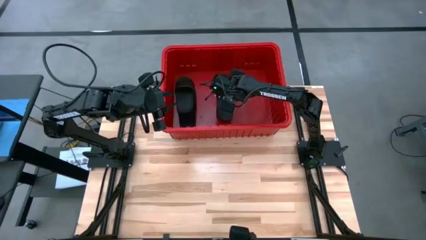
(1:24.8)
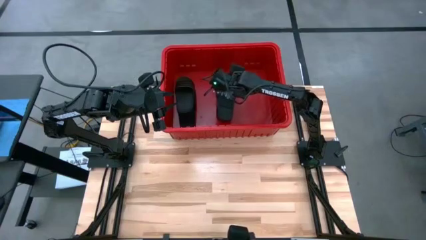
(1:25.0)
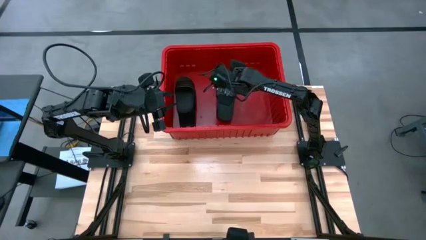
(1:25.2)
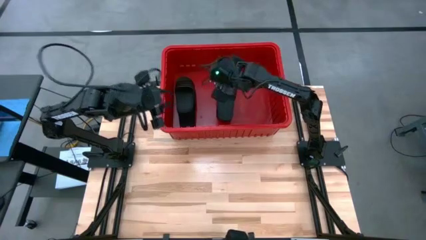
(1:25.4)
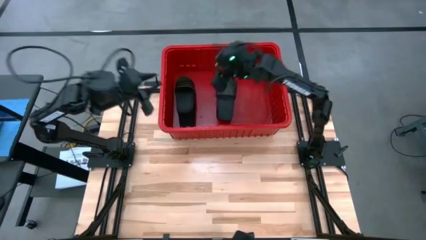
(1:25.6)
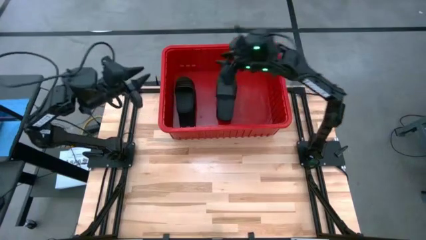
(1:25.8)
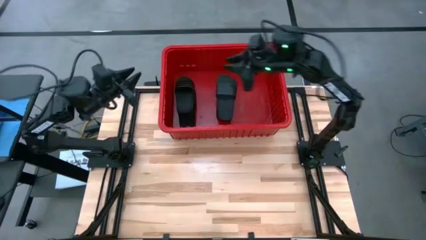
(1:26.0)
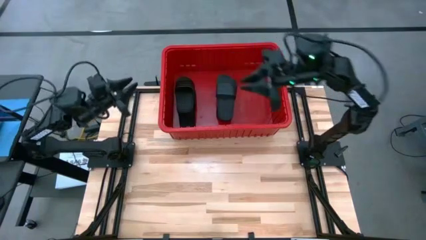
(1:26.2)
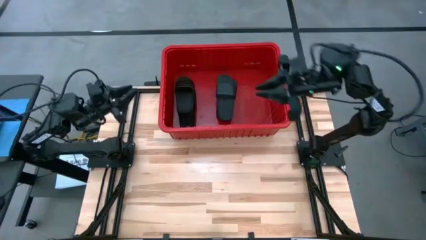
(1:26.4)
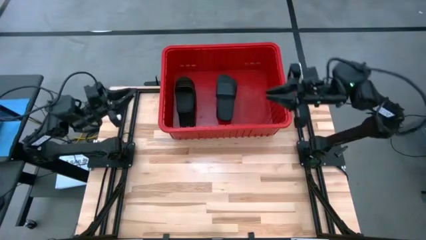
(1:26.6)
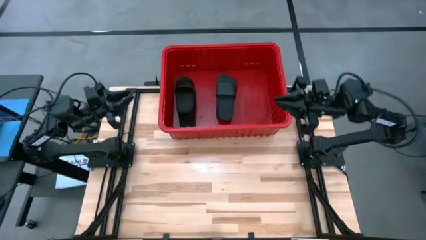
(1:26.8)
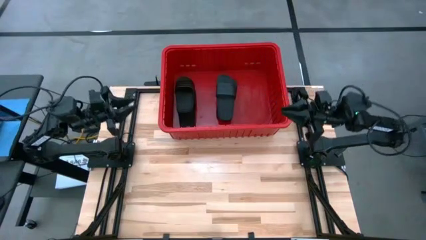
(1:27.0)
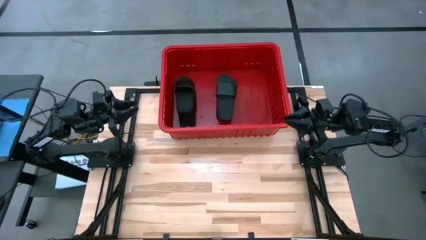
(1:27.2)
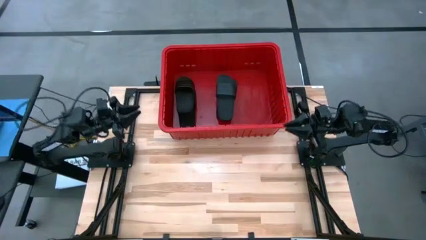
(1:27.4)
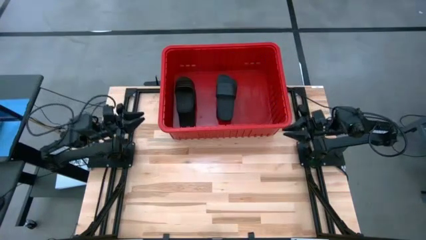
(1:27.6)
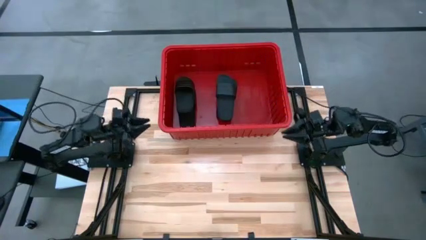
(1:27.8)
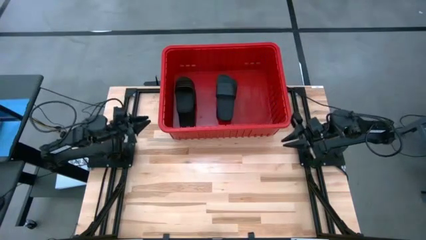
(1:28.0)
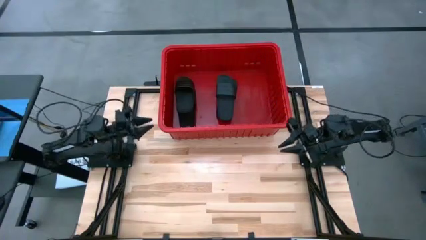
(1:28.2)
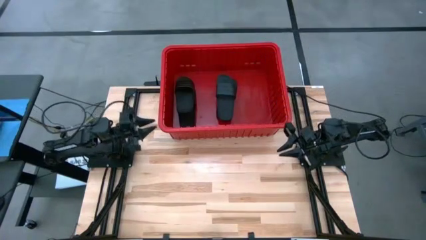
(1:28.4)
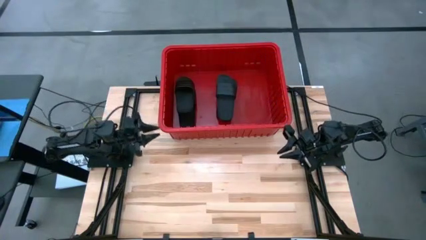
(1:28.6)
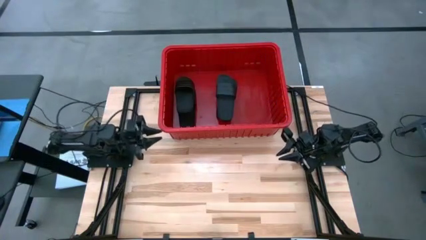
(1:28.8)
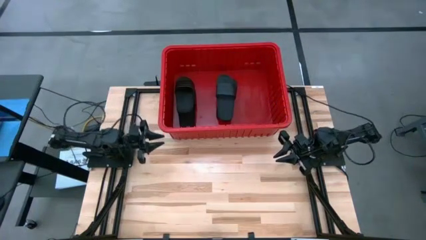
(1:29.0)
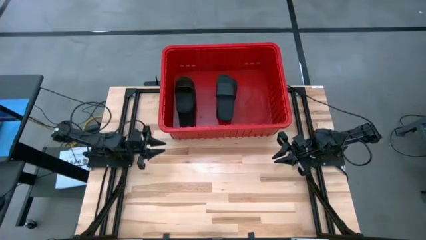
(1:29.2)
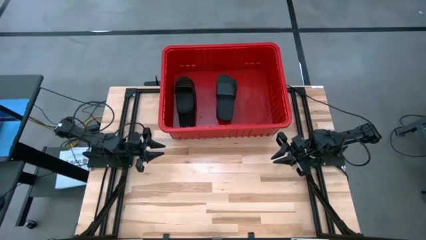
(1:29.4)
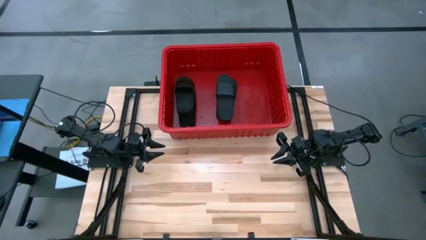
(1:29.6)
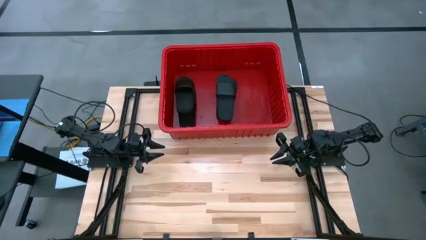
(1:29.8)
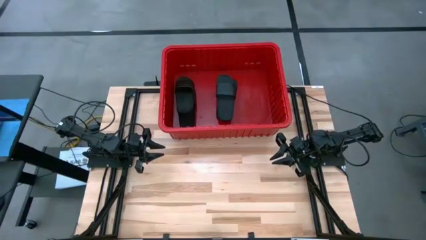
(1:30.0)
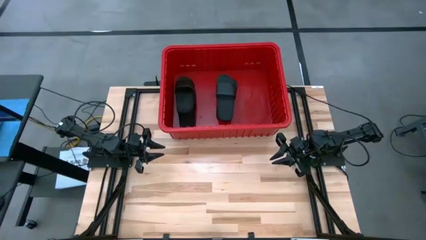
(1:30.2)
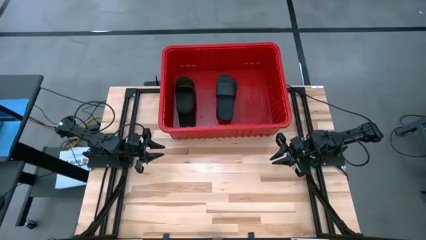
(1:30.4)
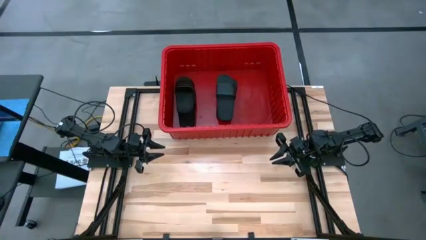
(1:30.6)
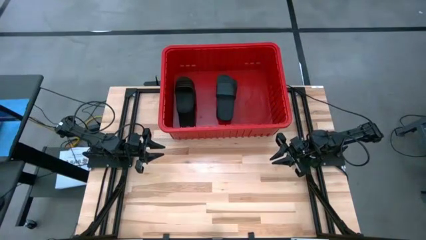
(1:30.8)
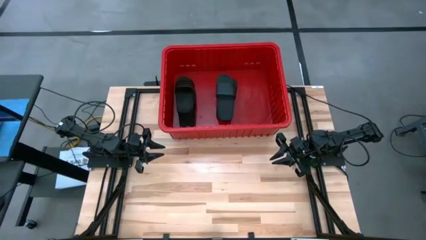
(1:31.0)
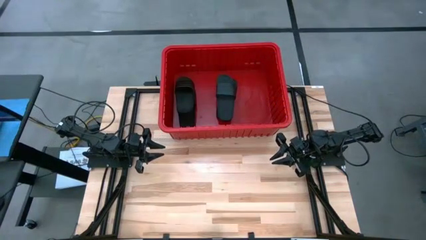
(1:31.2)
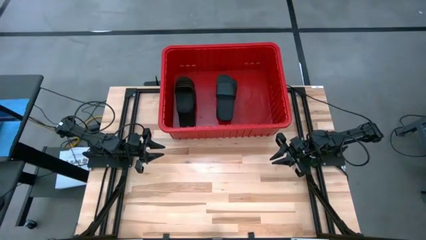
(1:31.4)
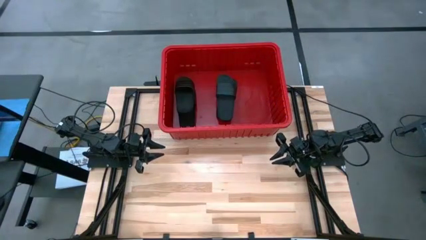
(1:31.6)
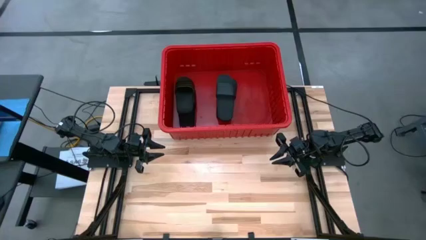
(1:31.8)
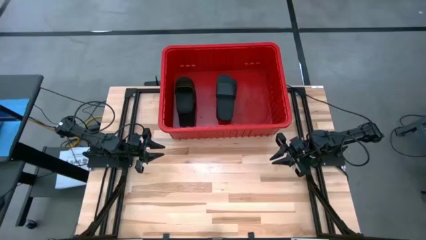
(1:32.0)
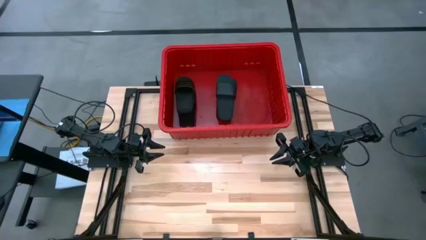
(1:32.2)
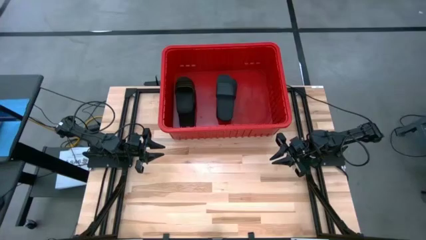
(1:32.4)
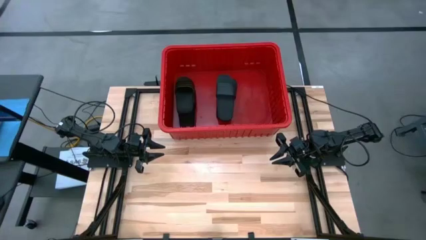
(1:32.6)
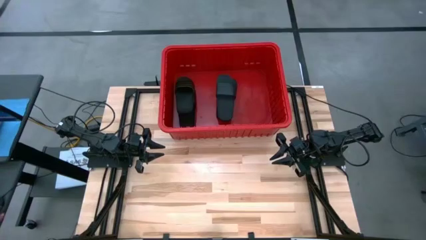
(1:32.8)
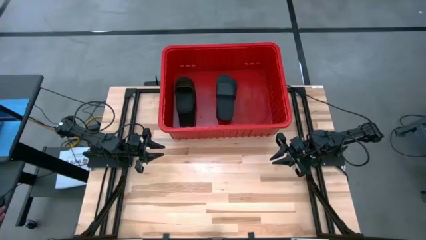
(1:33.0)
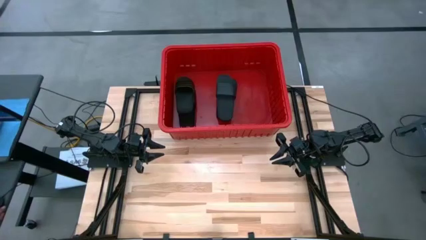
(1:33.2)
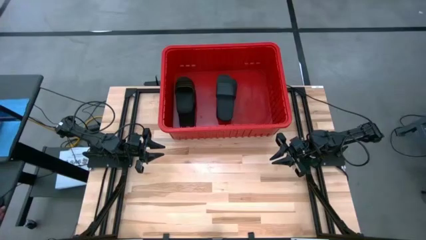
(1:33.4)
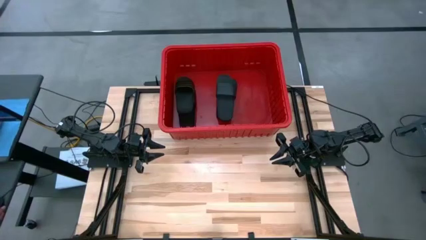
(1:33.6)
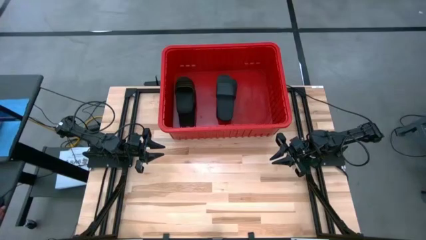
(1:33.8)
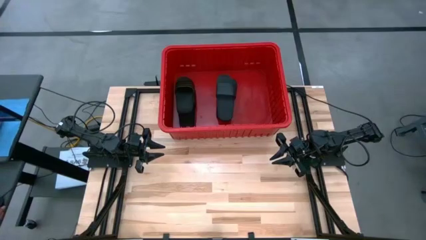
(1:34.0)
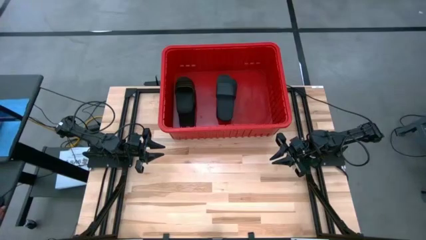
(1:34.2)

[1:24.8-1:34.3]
Task: Pick and place slides into bin
Return to Home Position
